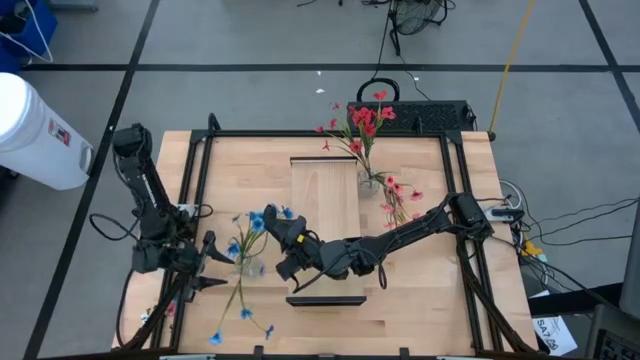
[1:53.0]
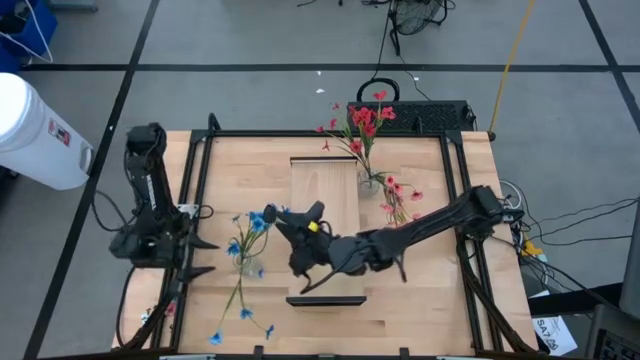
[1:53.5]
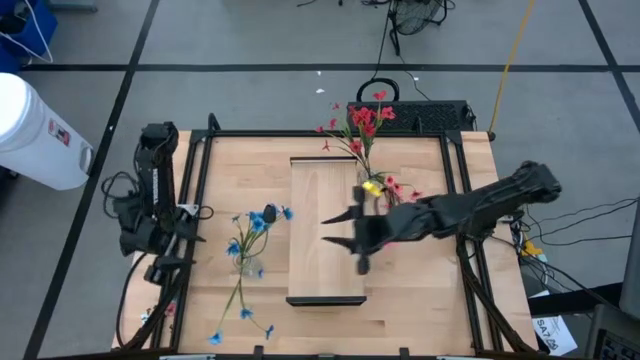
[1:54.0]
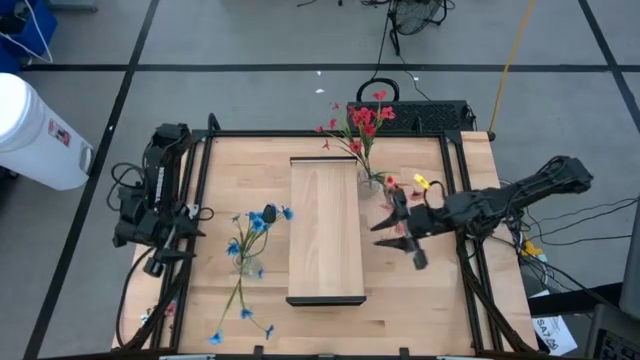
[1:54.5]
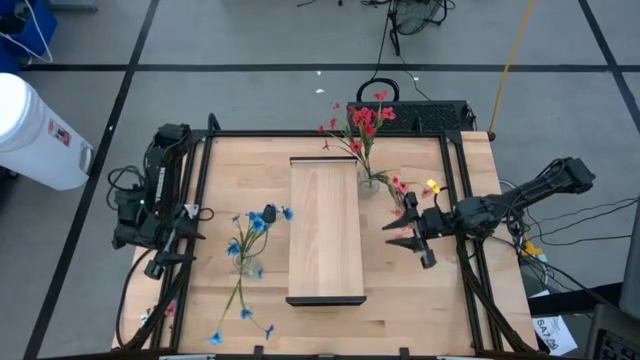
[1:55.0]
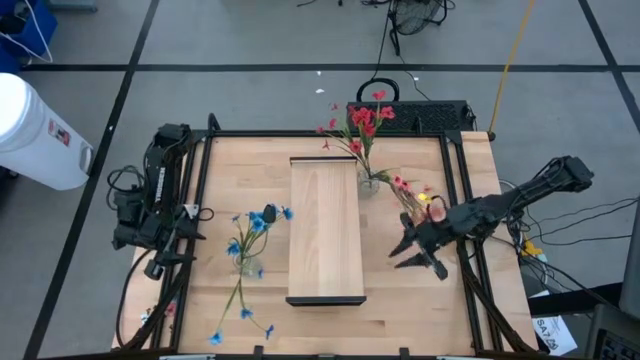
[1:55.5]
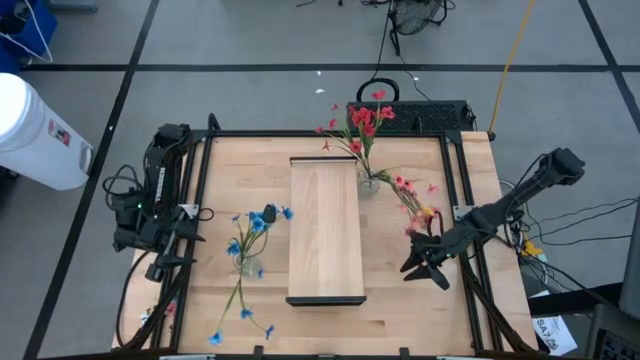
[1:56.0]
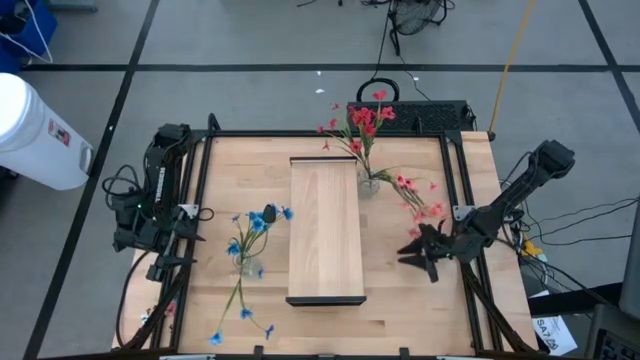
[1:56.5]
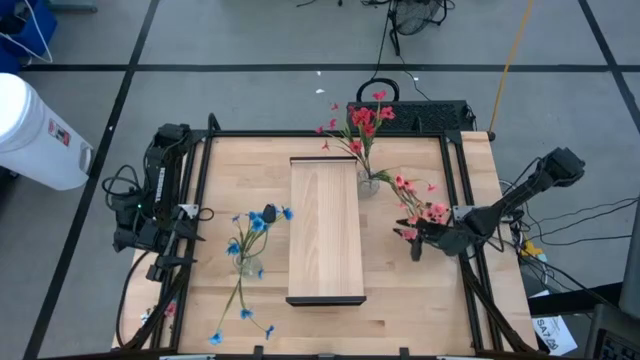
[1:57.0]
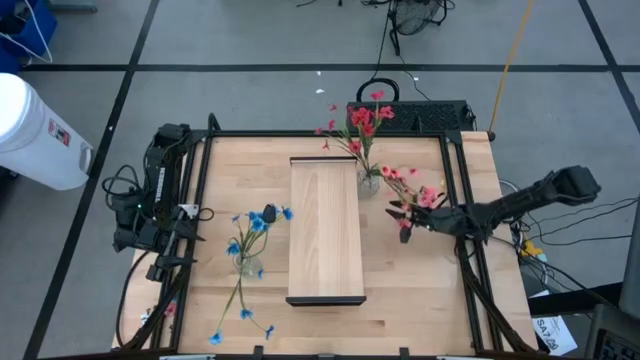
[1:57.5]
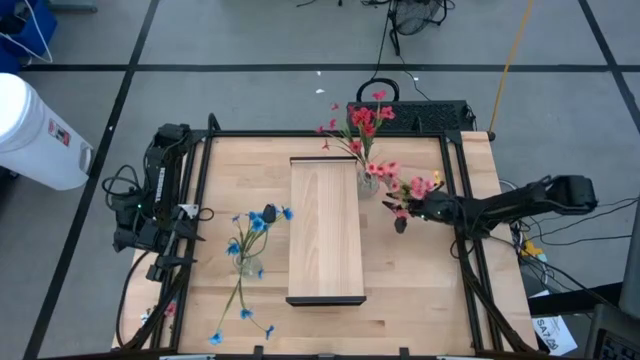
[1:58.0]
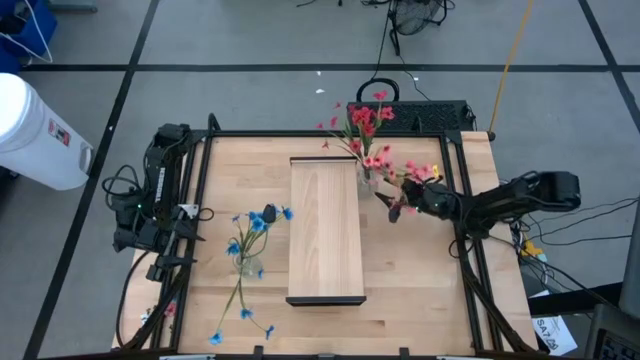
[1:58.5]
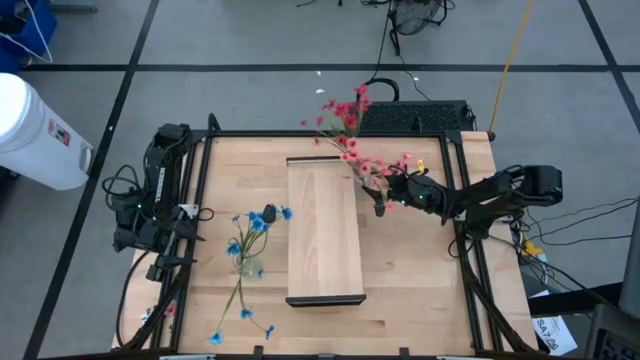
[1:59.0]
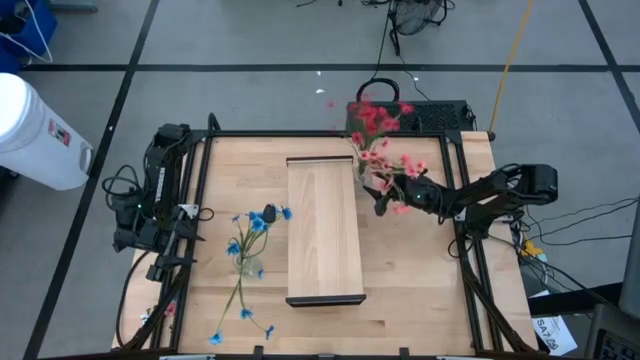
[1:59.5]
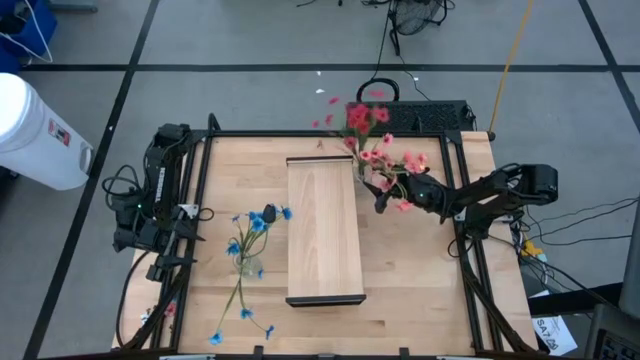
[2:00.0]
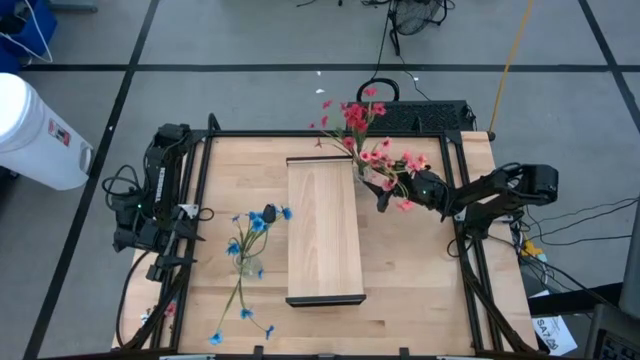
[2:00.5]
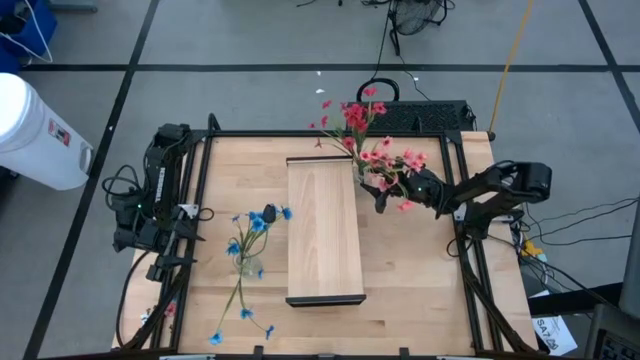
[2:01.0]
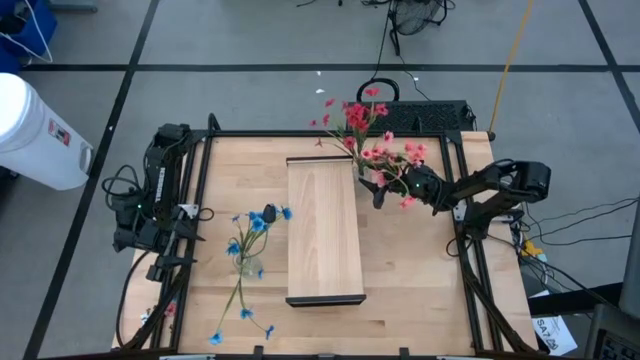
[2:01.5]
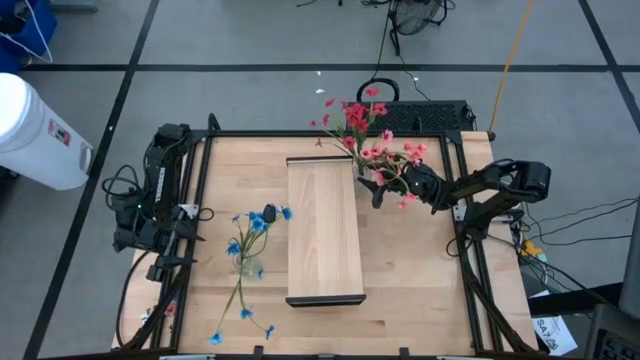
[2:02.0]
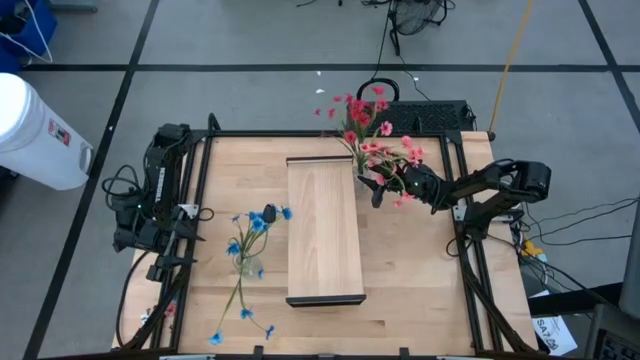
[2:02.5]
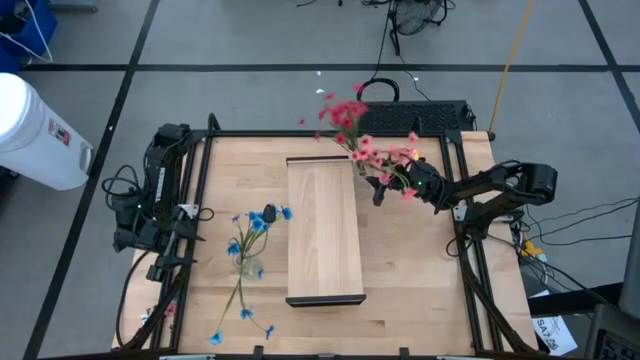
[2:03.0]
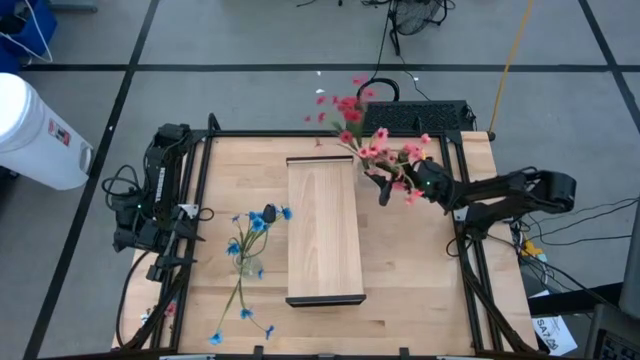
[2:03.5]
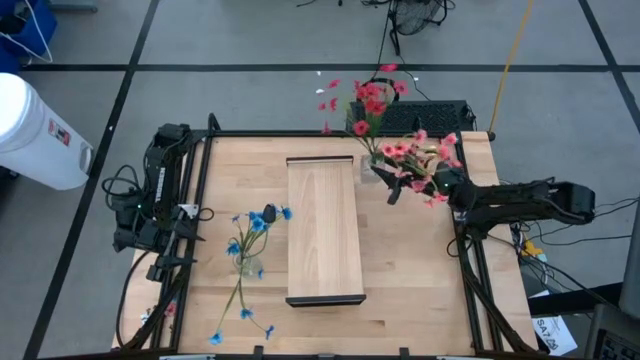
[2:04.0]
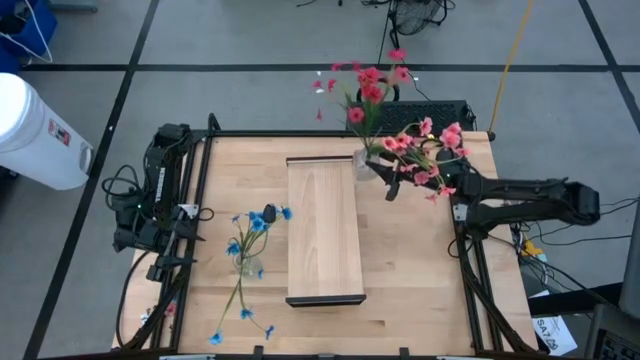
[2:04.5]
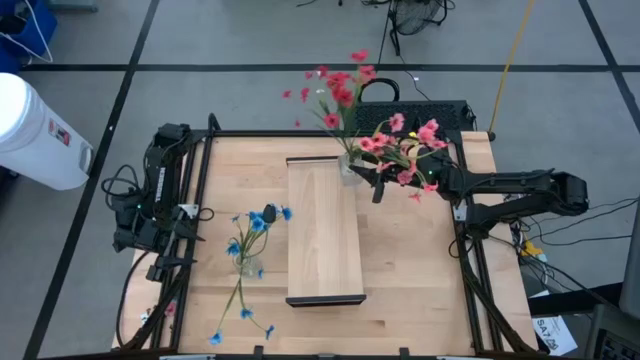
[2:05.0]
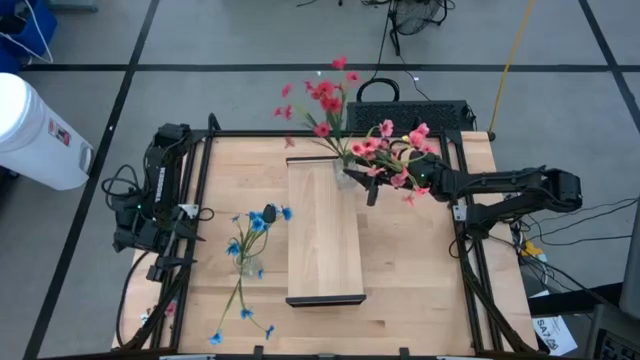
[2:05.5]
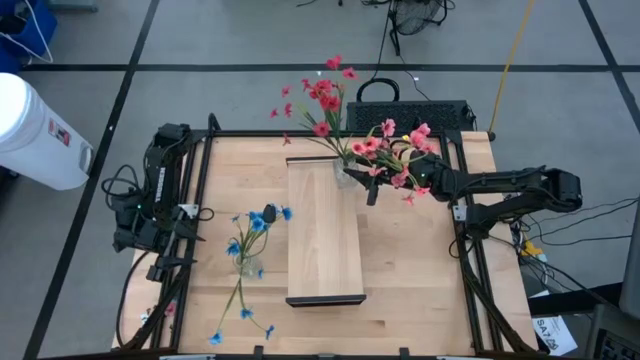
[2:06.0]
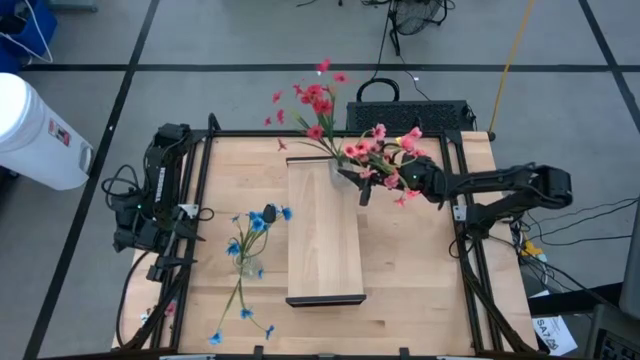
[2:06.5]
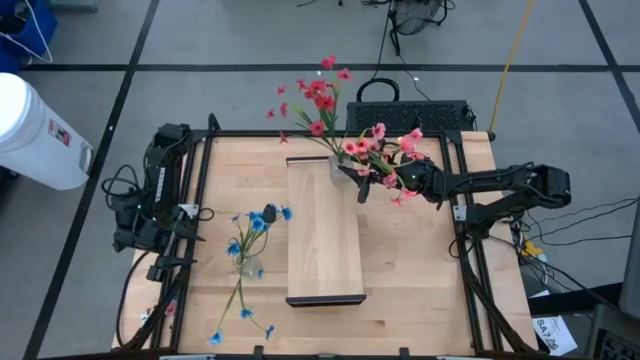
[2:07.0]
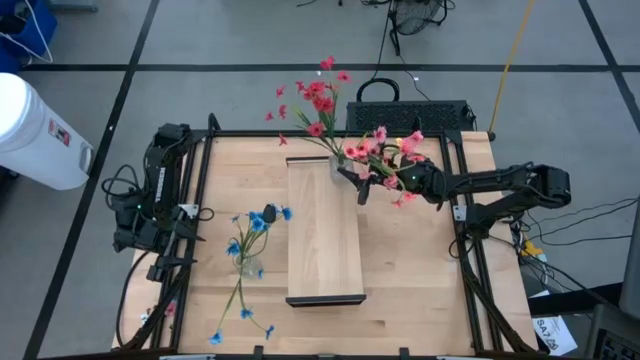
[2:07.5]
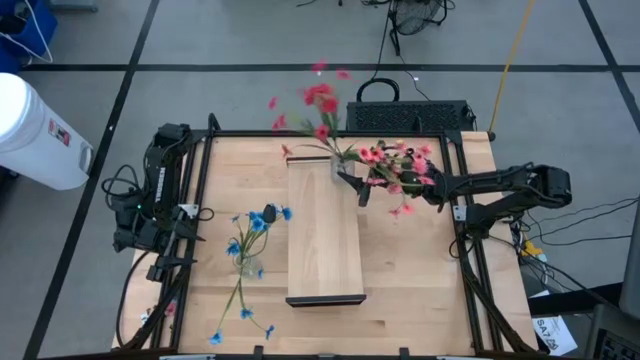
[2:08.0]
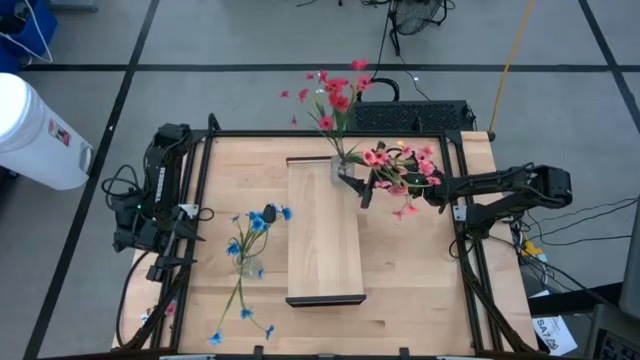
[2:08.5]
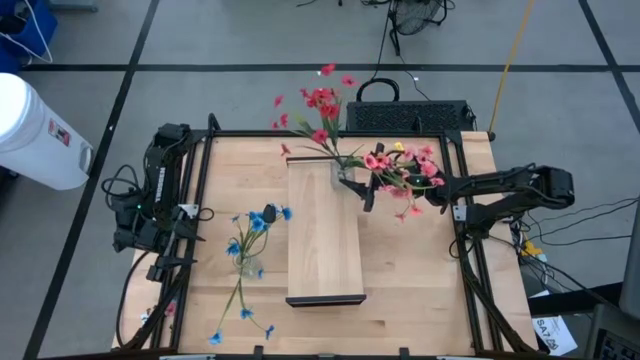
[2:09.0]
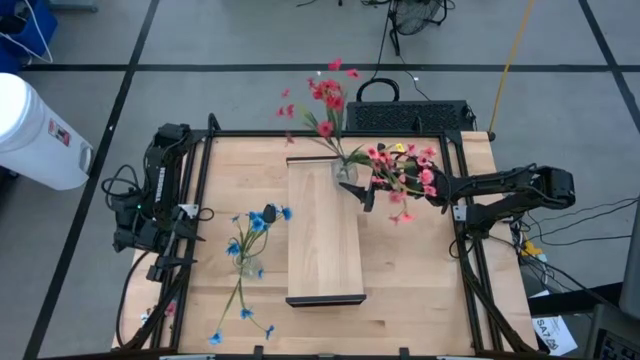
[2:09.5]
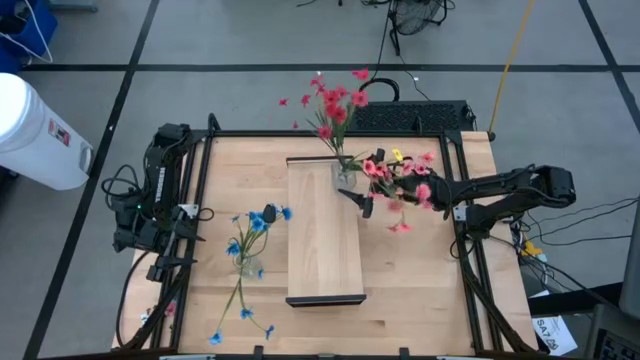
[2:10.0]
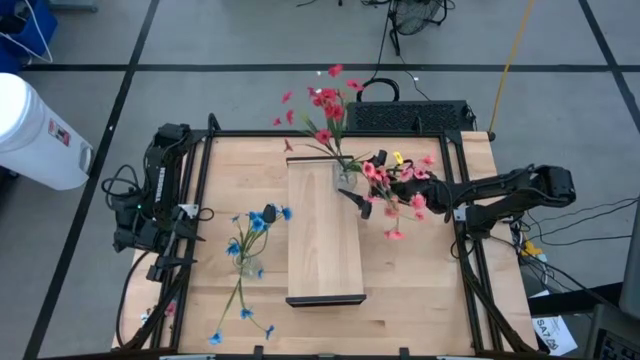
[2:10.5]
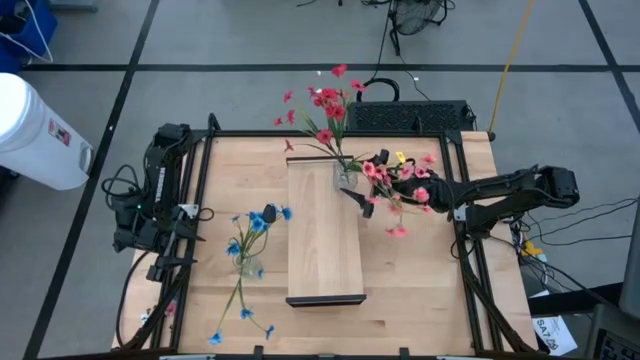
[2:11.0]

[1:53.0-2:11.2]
Task: Pick and place flowers into a vace then onto a shelf
Put the right transparent vase on the shelf

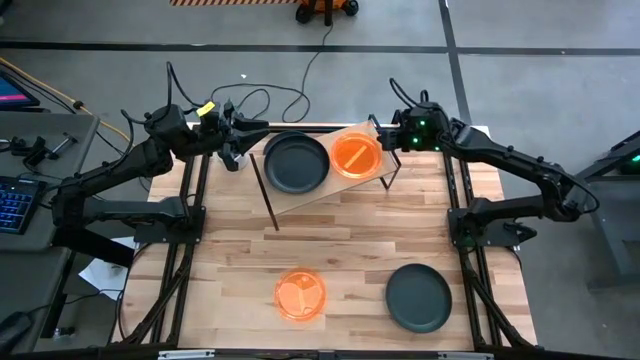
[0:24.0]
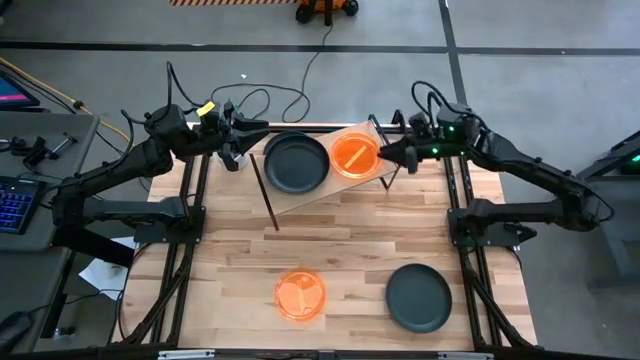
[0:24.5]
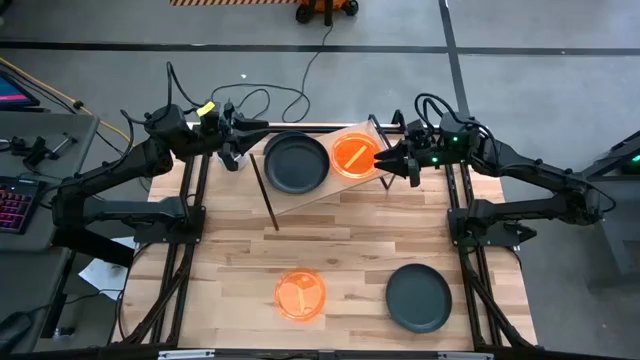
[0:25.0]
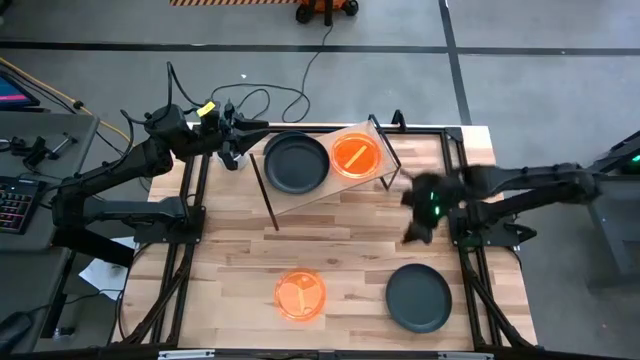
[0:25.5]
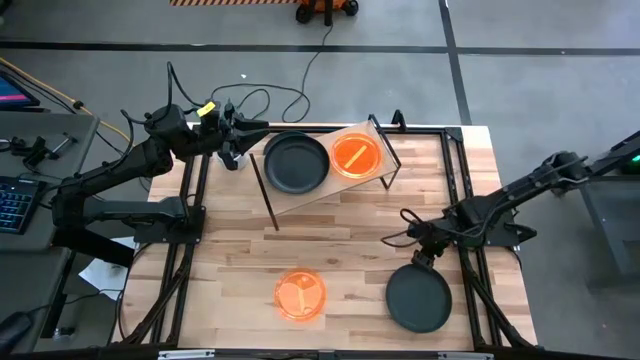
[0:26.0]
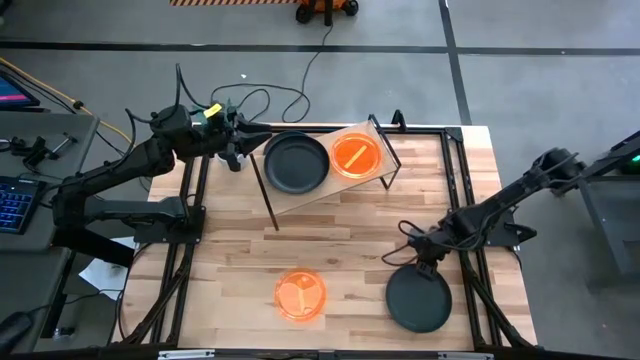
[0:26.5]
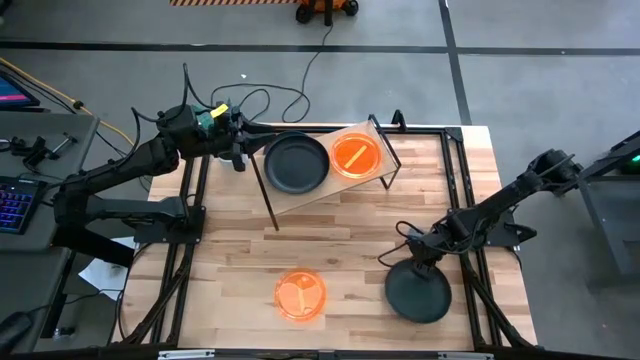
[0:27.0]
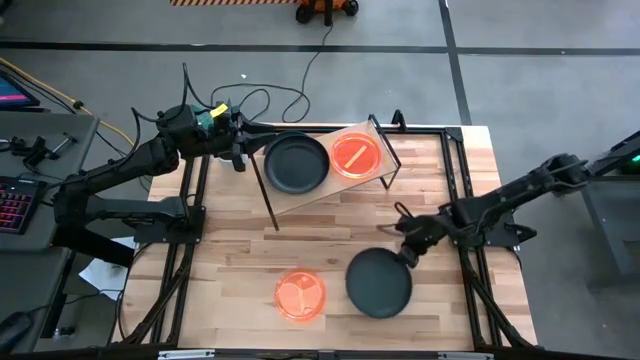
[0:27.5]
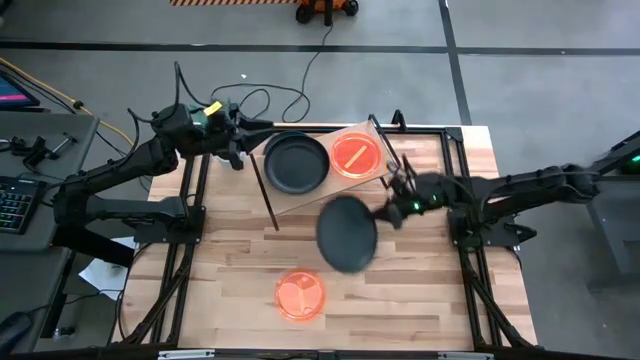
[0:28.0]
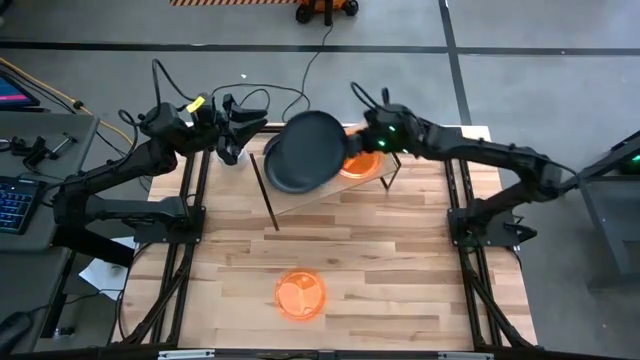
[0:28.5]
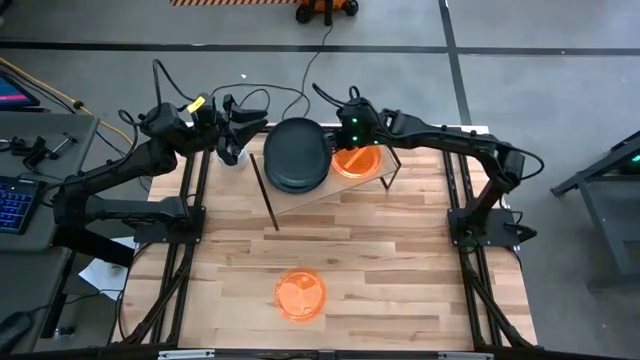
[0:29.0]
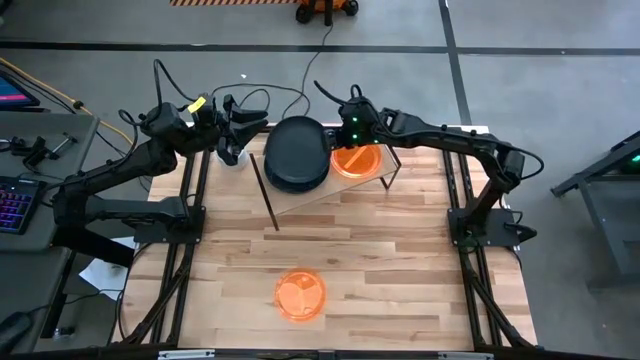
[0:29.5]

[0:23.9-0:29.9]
Task: Place and stack plates onto a shelf
Stack the bottom black plate on top of the black plate on the shelf
